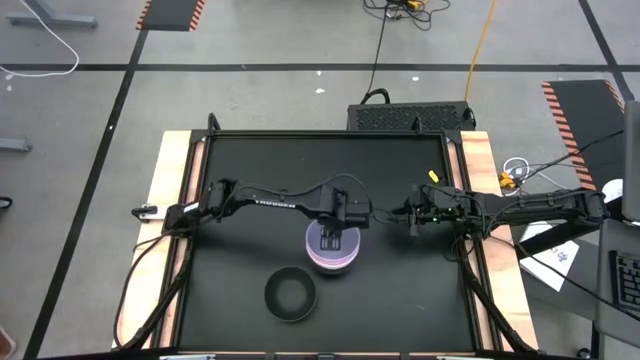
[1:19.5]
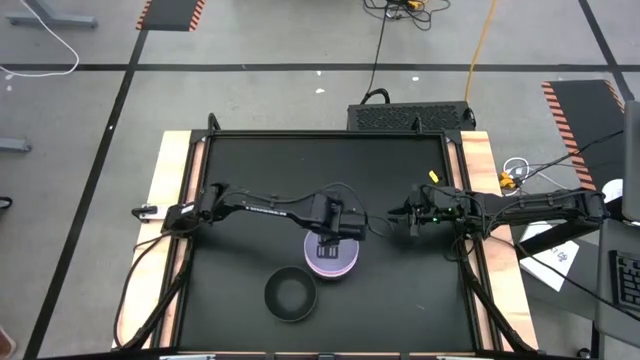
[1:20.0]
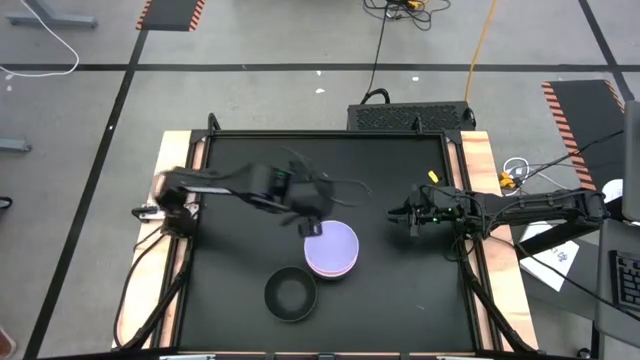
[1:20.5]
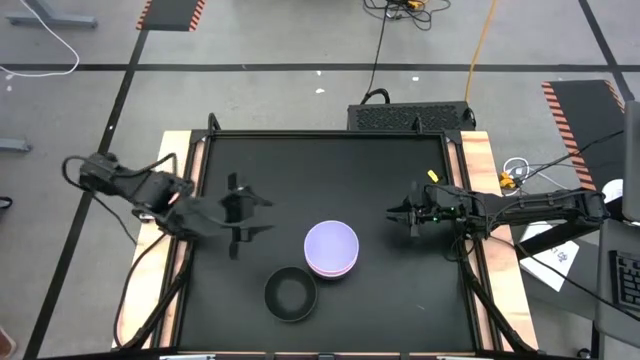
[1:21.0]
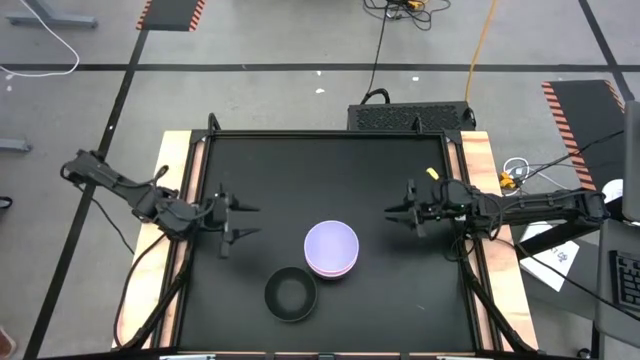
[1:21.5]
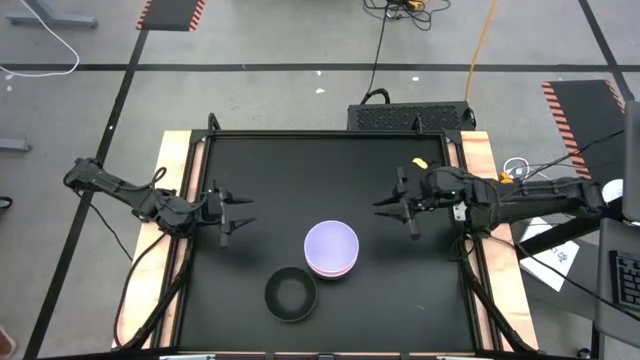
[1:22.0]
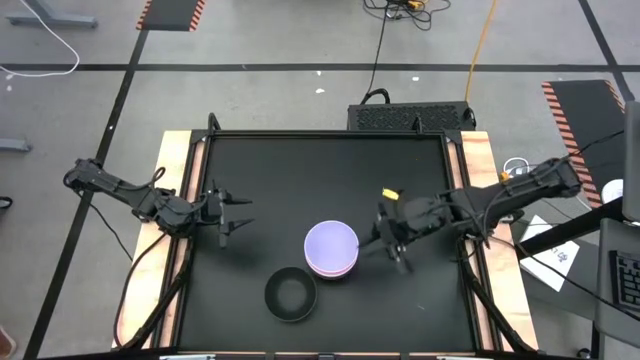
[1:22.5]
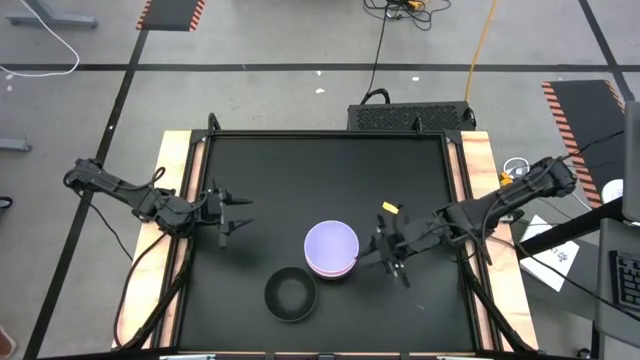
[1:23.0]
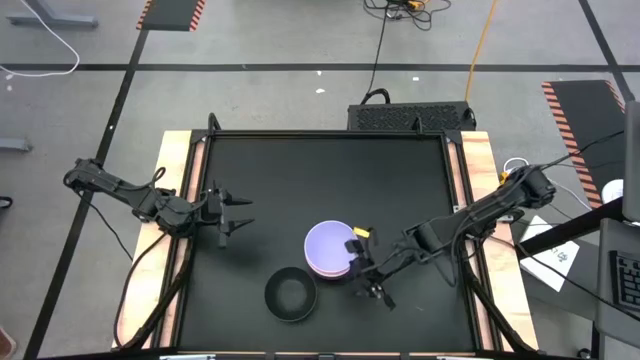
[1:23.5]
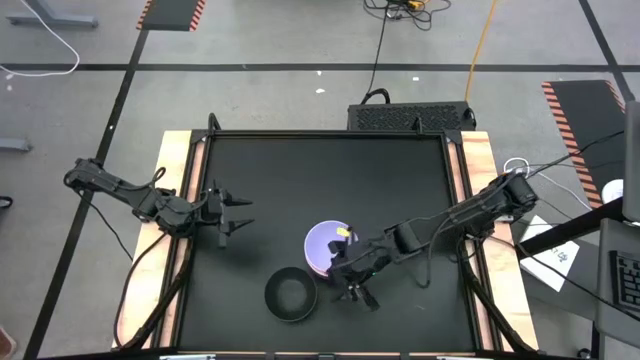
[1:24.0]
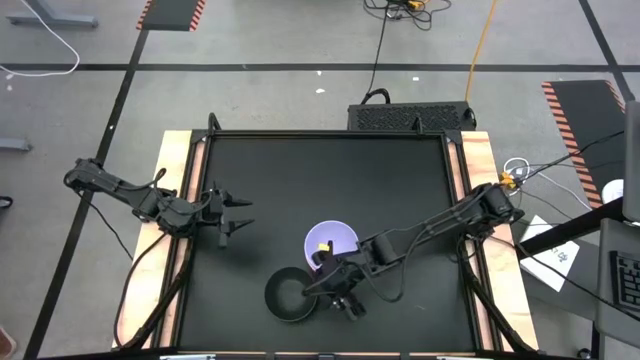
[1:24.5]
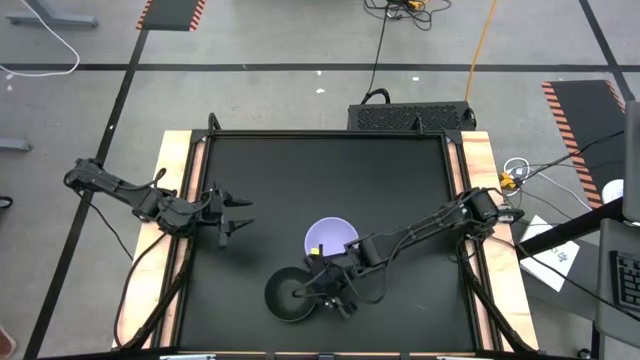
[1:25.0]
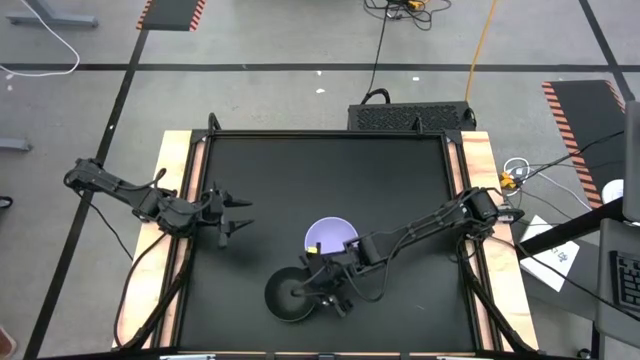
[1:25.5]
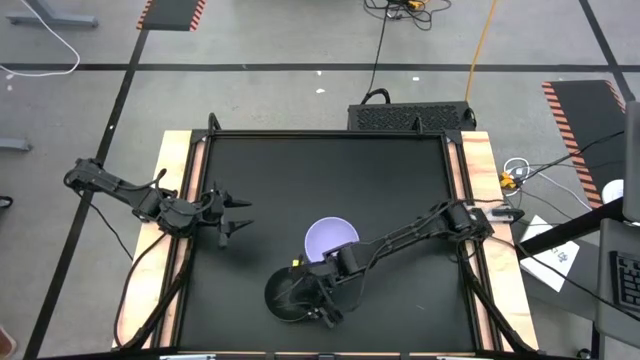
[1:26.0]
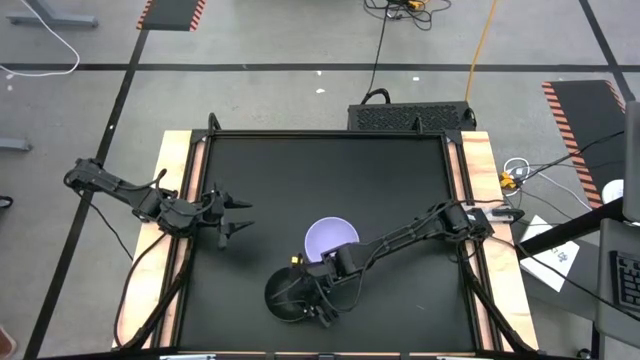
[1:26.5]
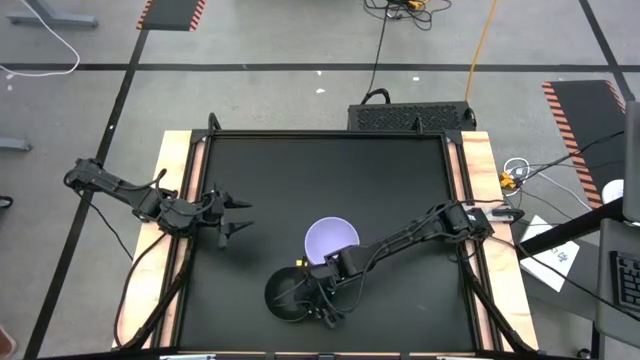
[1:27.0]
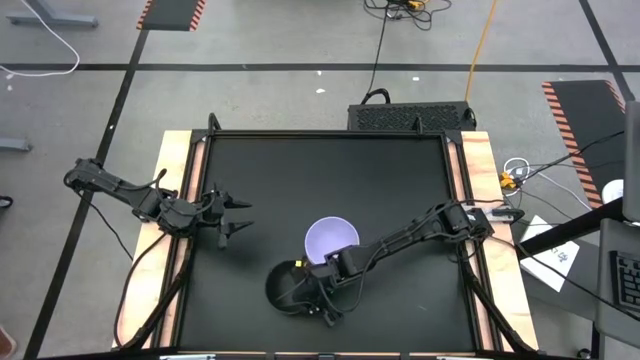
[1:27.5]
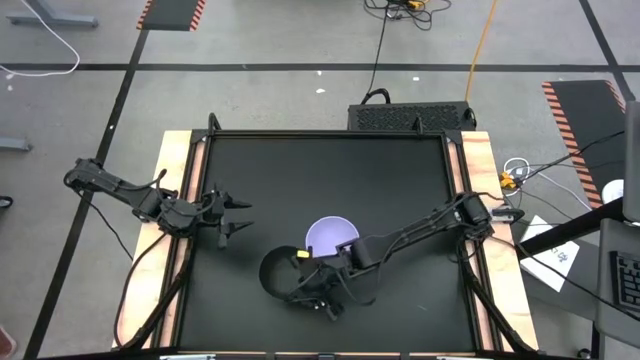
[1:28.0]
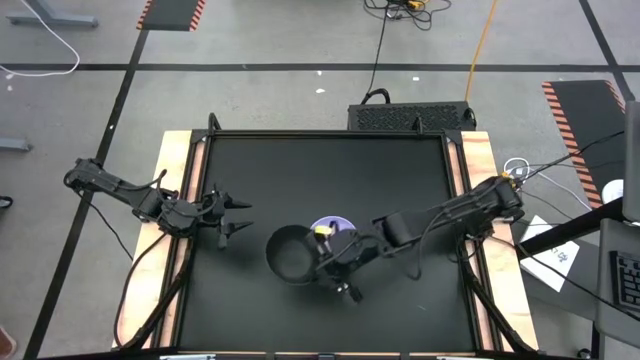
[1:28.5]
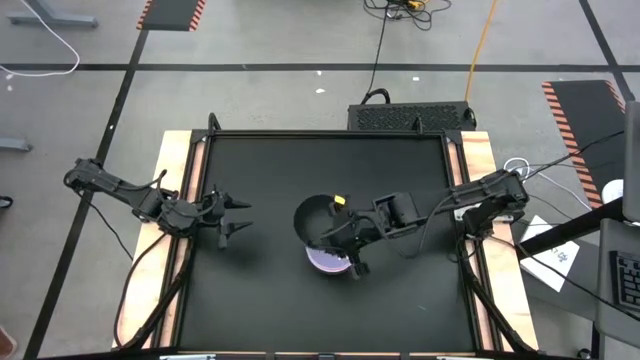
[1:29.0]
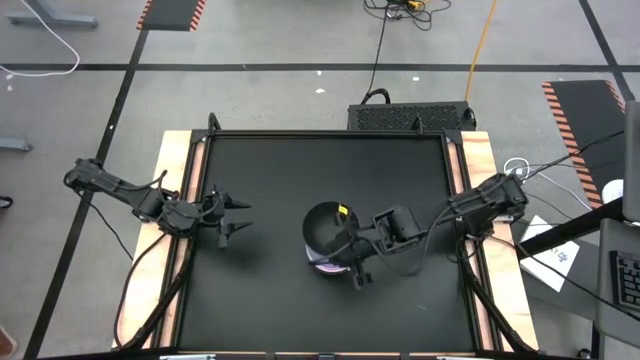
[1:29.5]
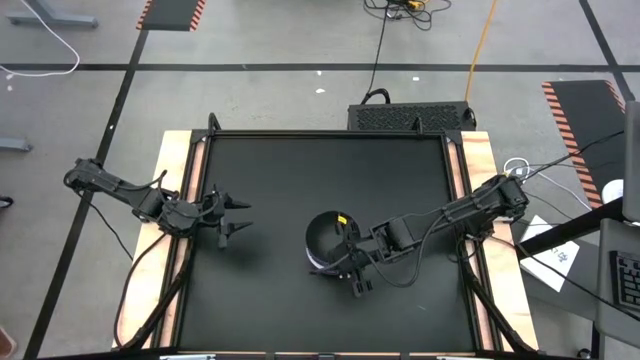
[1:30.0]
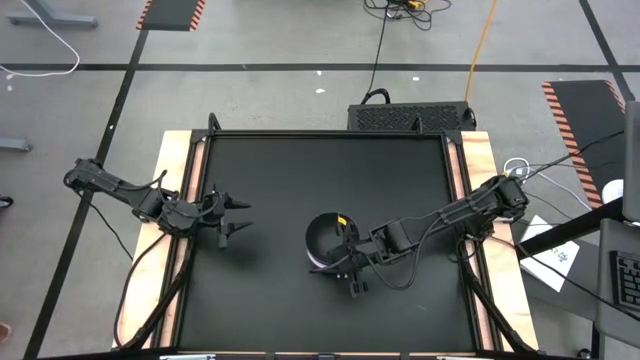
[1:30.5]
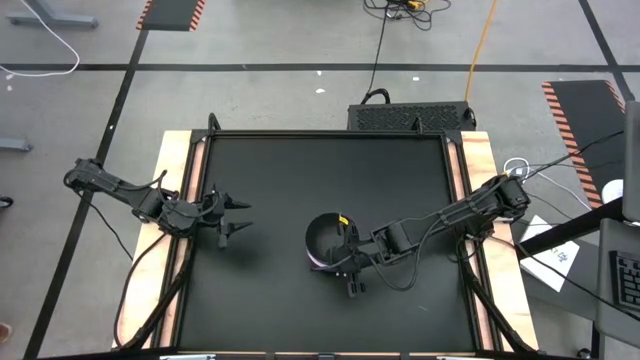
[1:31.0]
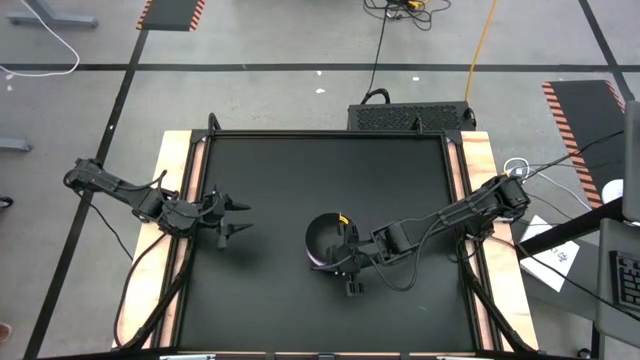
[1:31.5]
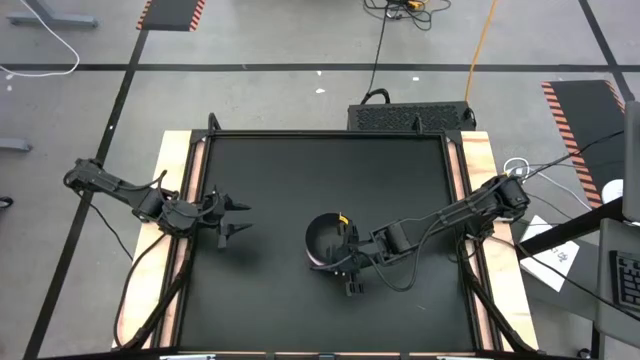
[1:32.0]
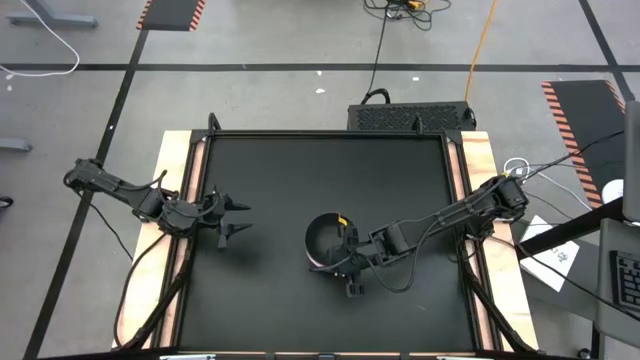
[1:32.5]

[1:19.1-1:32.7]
Task: Nest bowls inside each other
Stack the black bowl on top of the purple bowl
